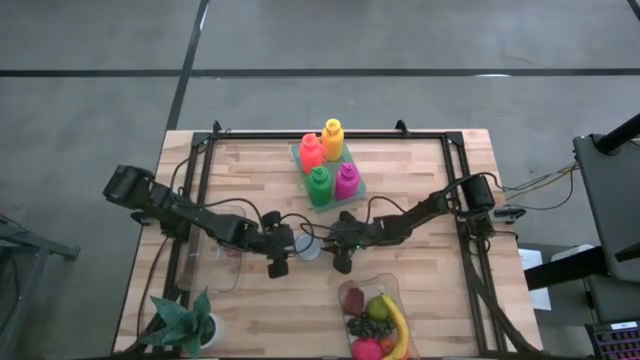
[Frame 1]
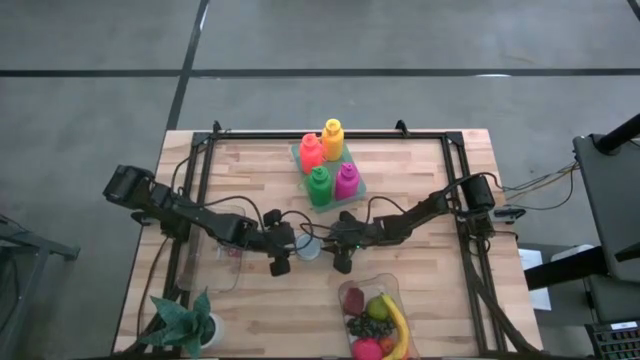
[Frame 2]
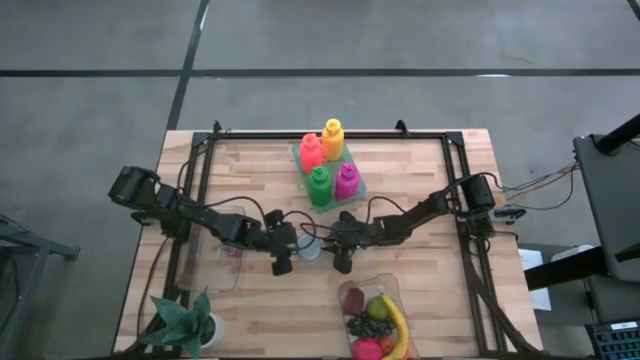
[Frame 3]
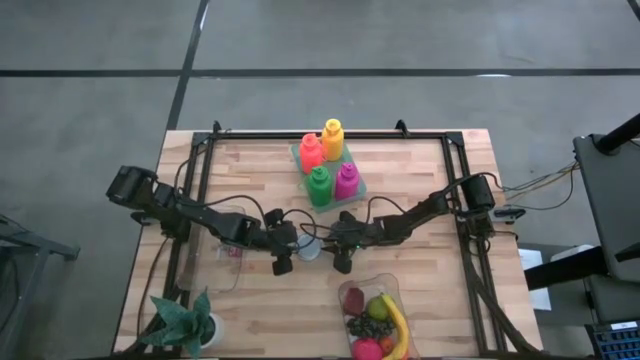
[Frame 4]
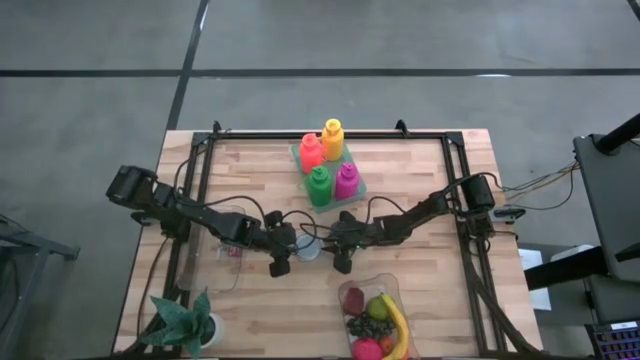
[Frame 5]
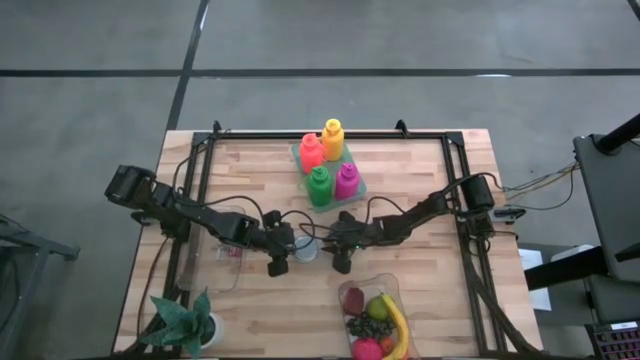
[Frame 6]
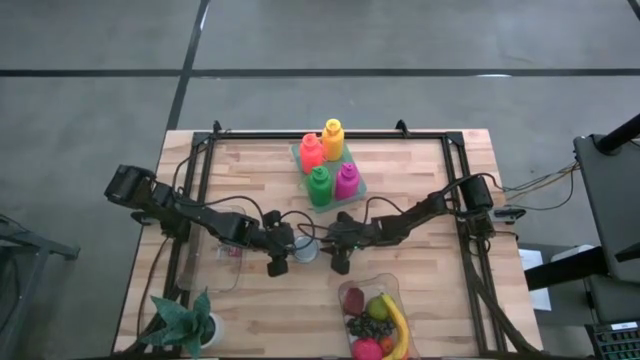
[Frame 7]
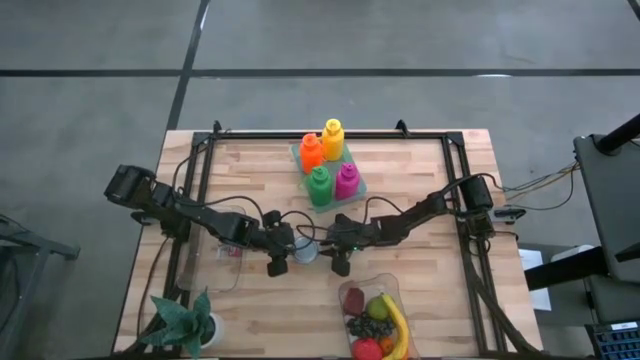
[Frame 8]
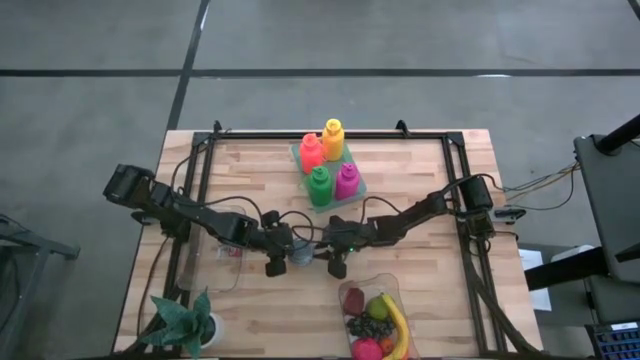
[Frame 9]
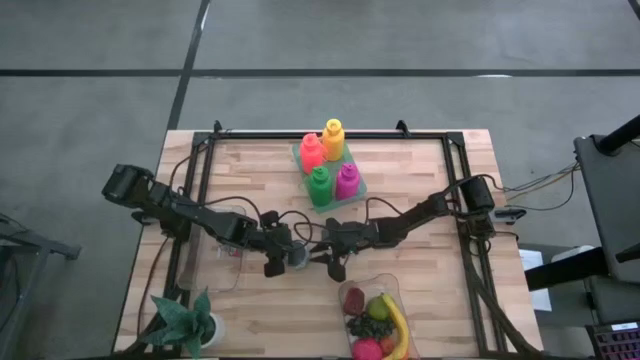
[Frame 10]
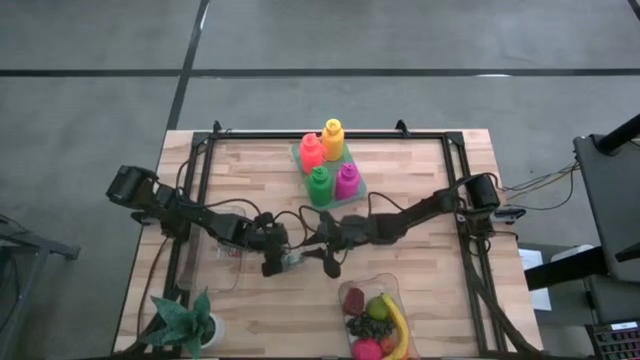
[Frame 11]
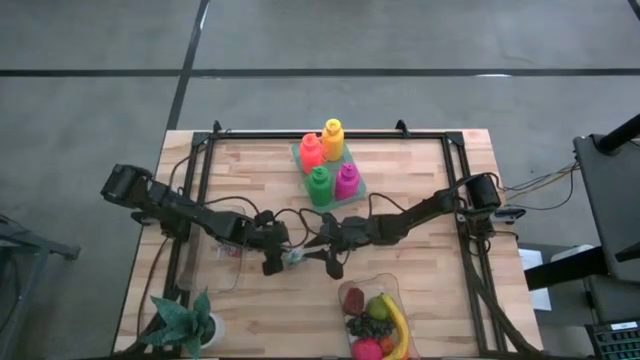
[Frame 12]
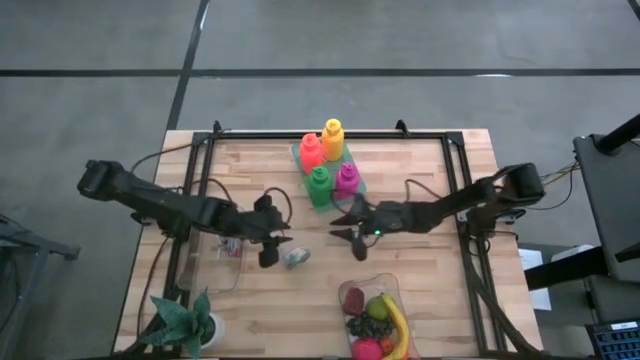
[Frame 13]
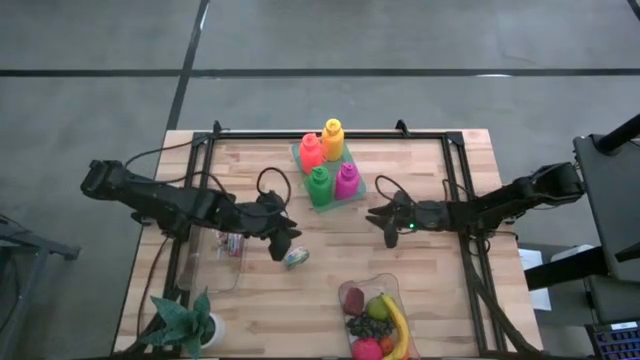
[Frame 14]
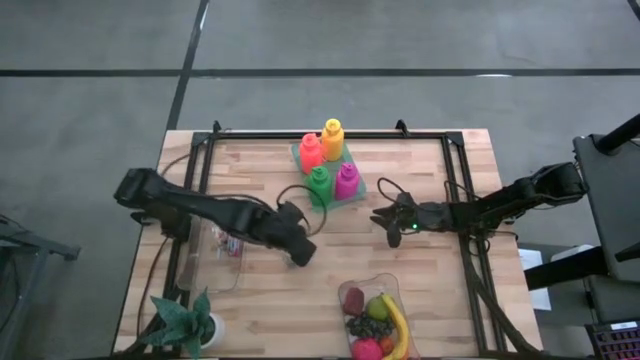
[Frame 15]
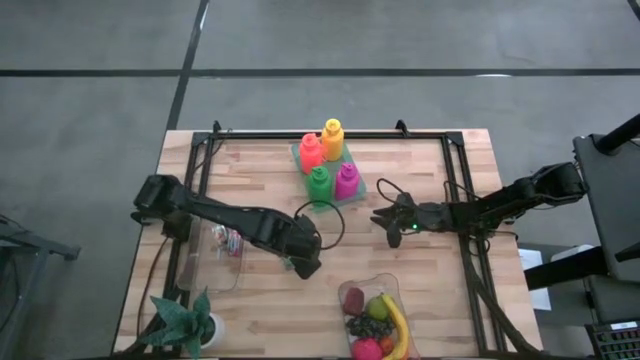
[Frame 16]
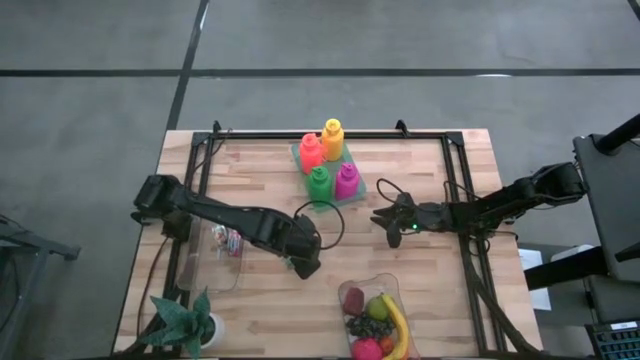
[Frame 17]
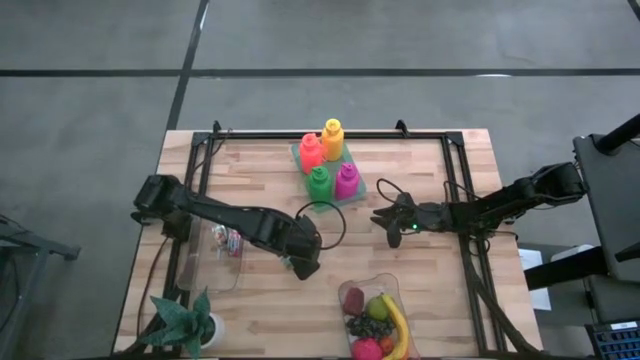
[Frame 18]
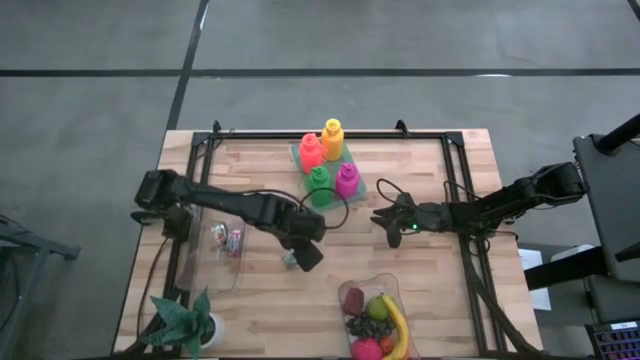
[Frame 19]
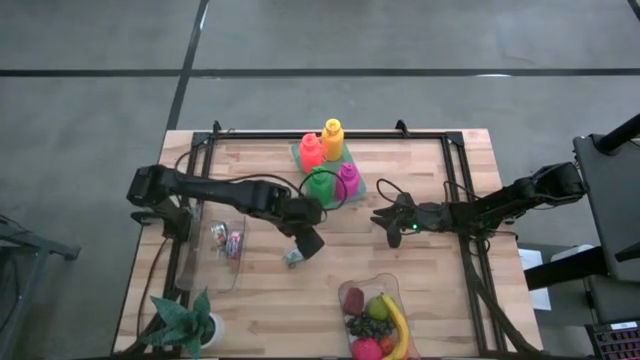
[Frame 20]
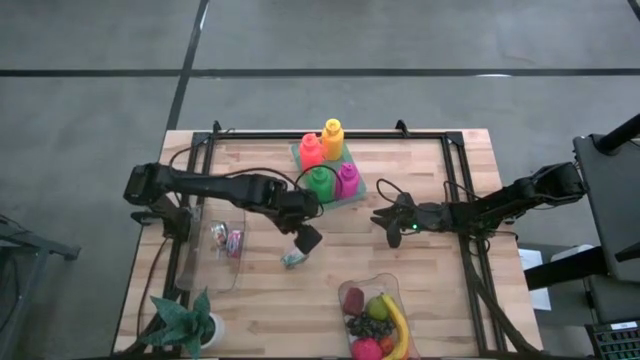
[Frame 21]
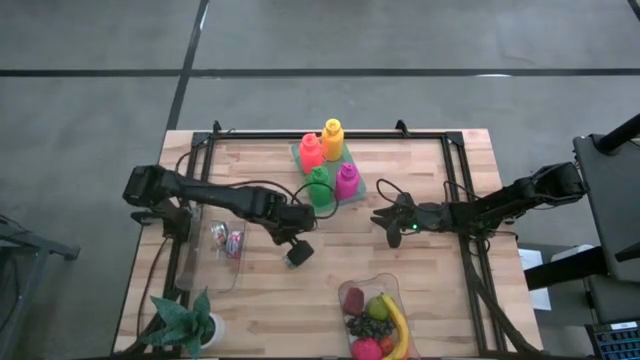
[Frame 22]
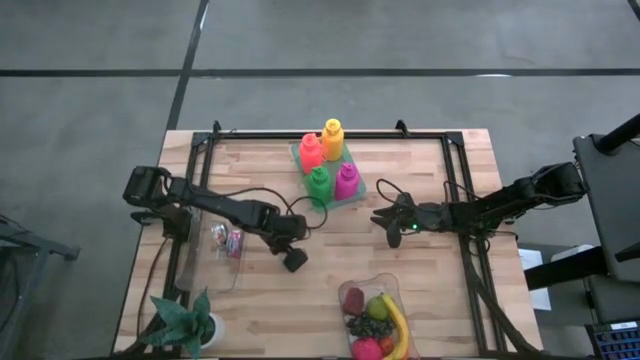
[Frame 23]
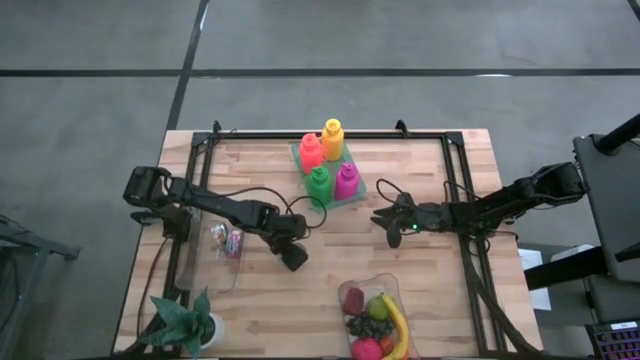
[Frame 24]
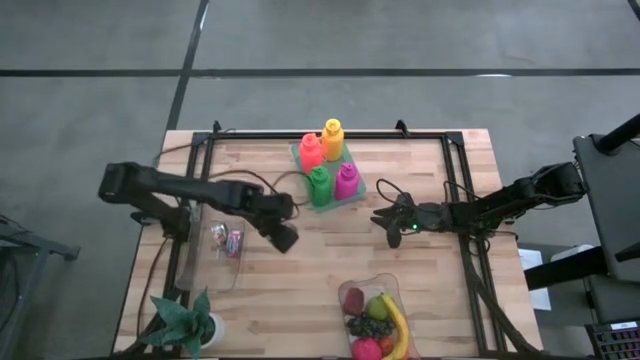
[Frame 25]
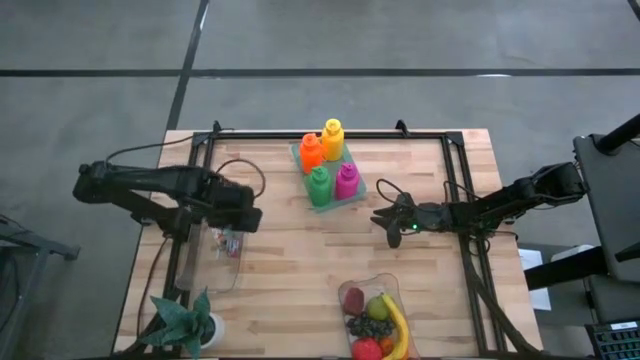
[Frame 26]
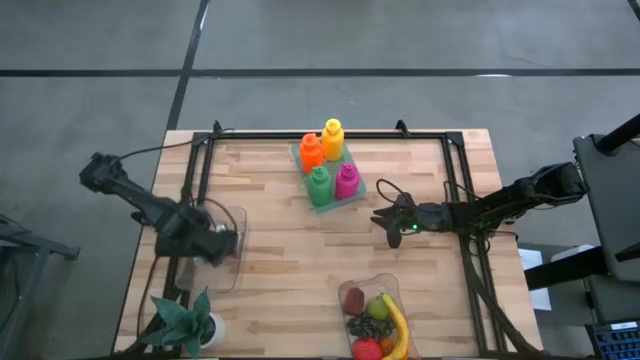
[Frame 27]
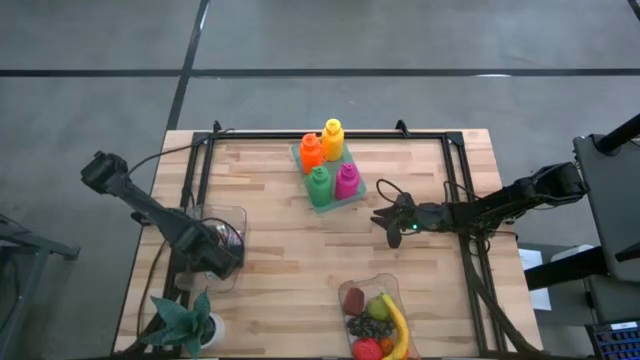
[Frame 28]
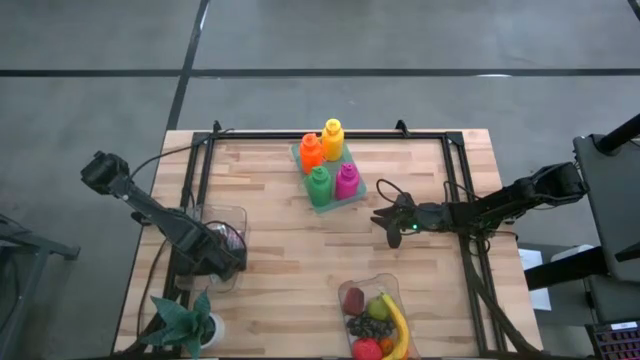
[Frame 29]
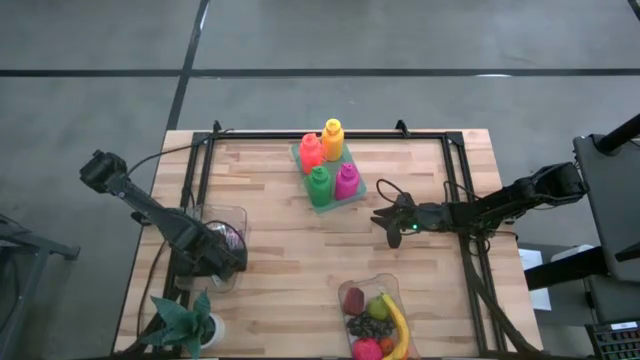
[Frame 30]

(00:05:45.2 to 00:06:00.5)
Task: Pick & Place Food Item
Put the green and white tuna can into the top transparent bin

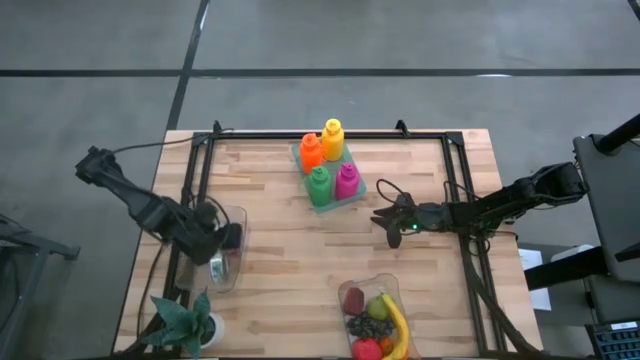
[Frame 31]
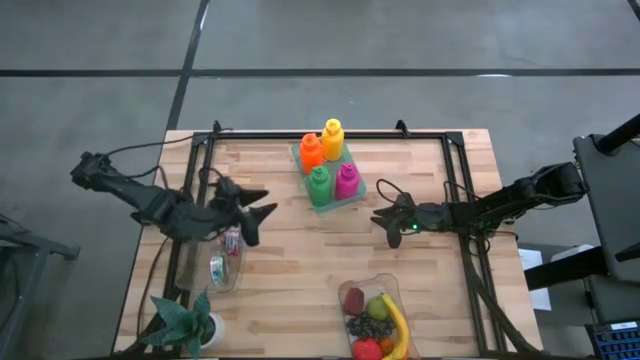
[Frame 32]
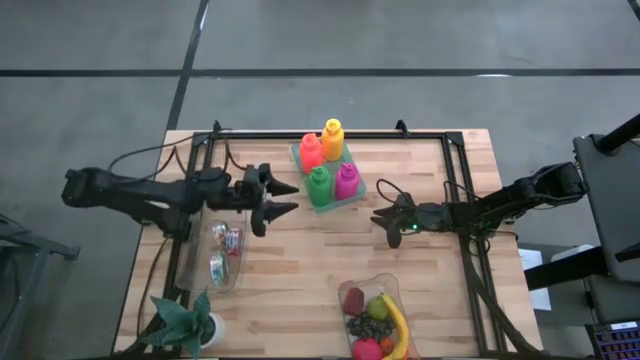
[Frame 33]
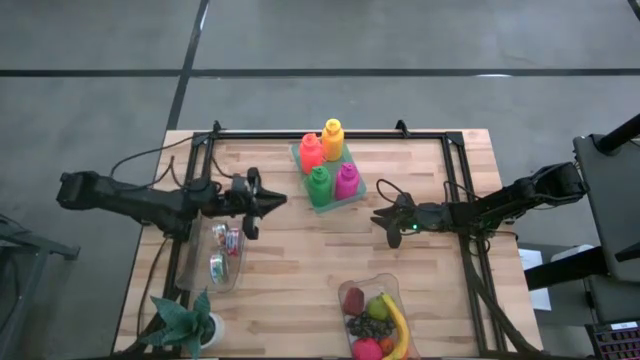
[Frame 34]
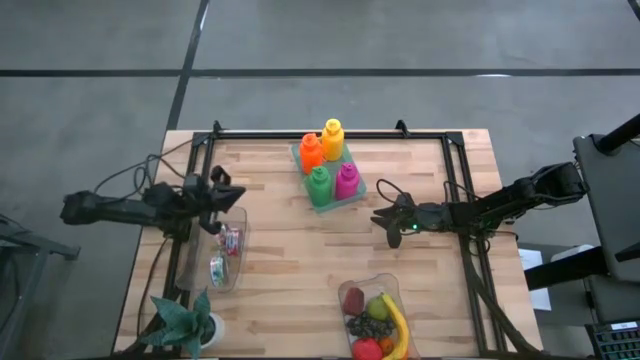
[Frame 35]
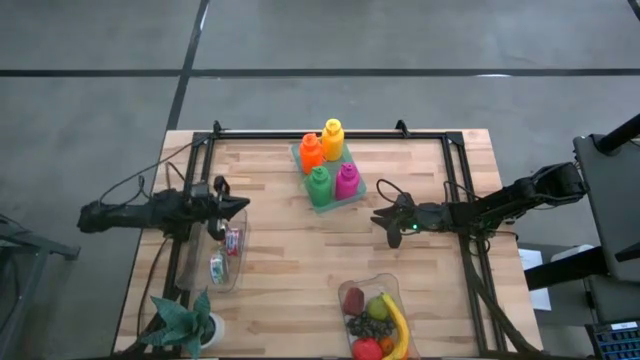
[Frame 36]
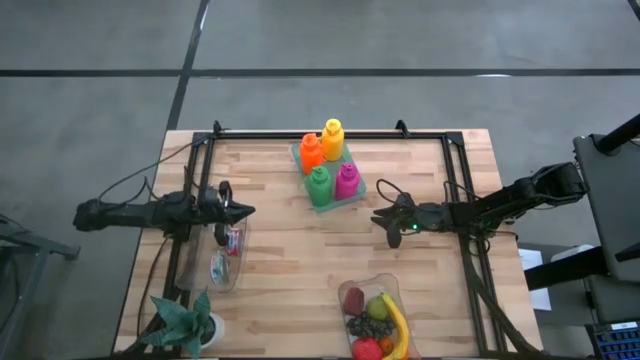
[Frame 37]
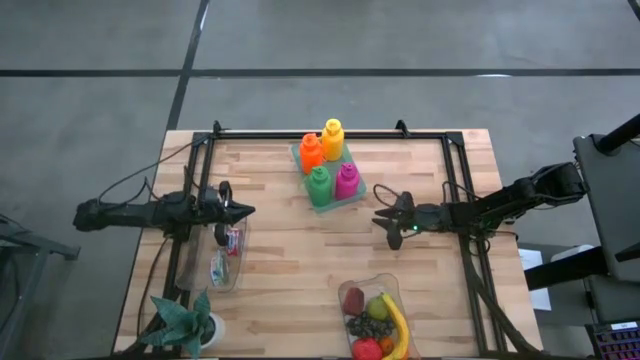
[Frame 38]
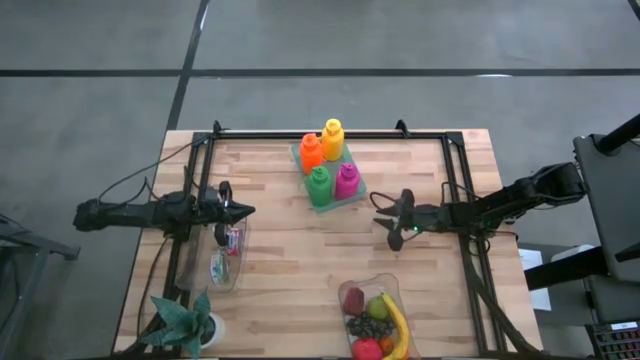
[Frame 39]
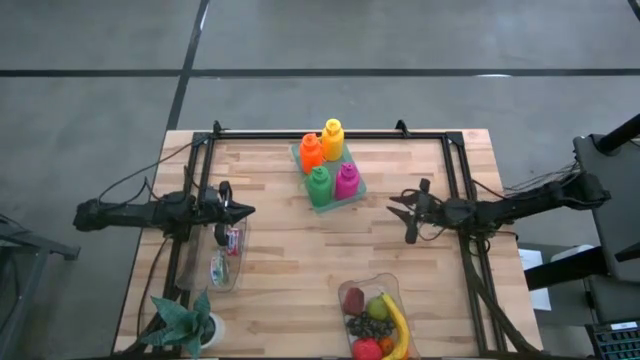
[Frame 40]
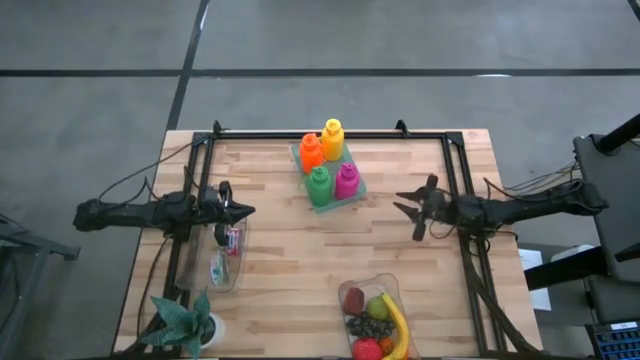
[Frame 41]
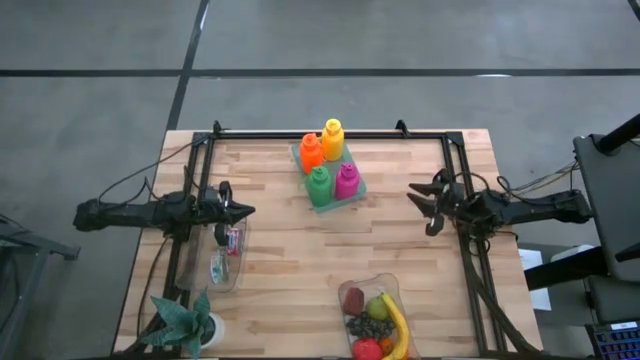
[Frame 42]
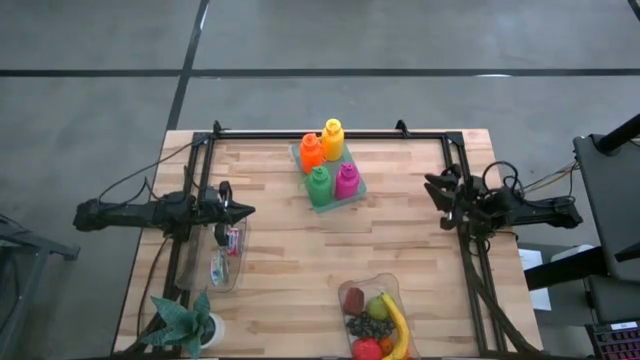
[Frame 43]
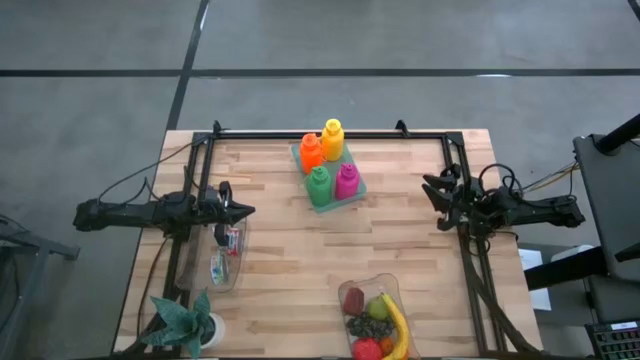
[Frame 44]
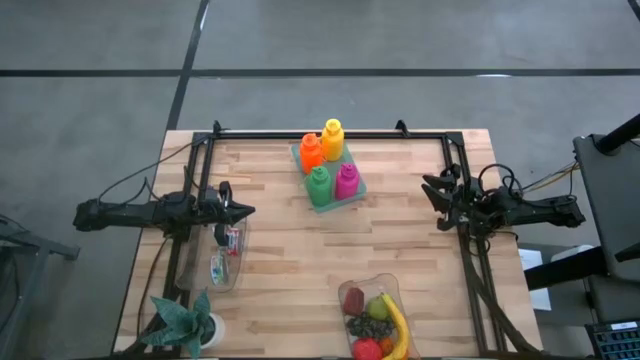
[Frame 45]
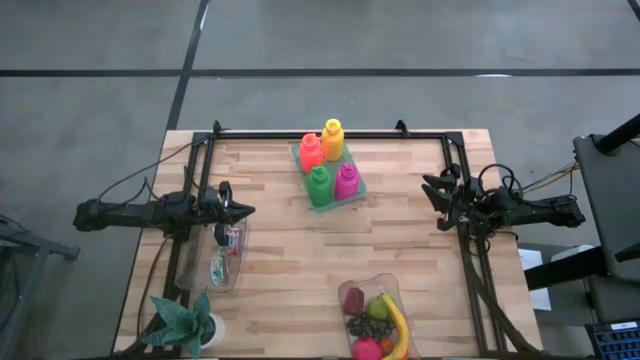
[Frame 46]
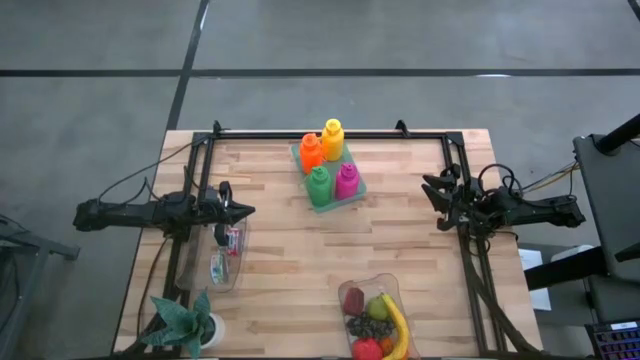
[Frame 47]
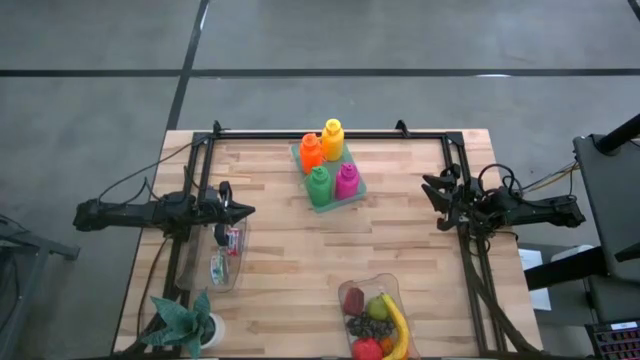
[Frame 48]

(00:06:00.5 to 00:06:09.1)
Return to Home Position
